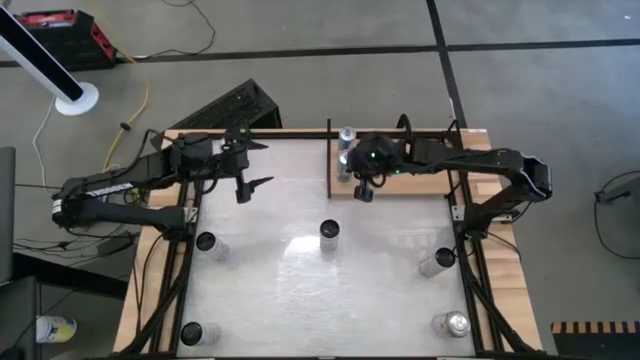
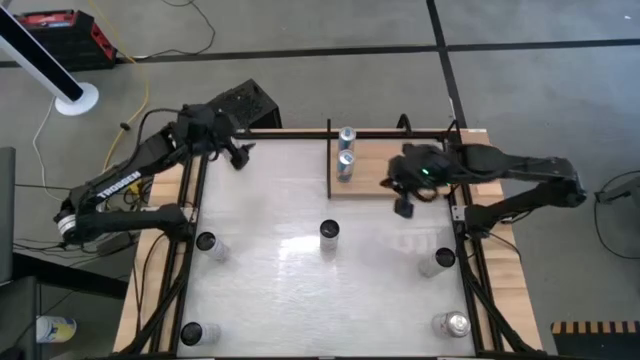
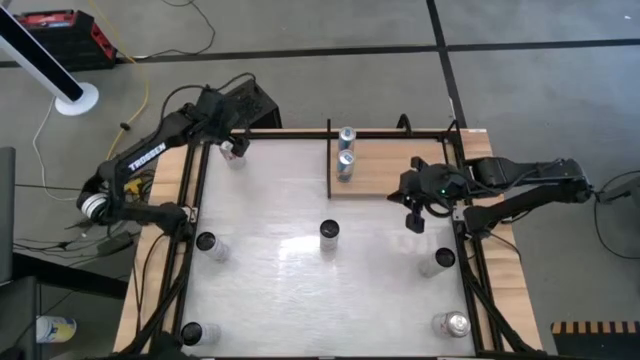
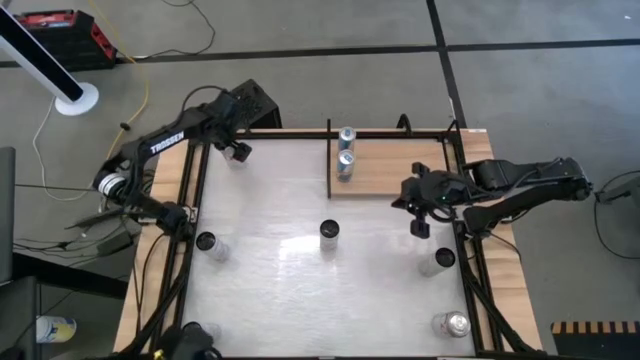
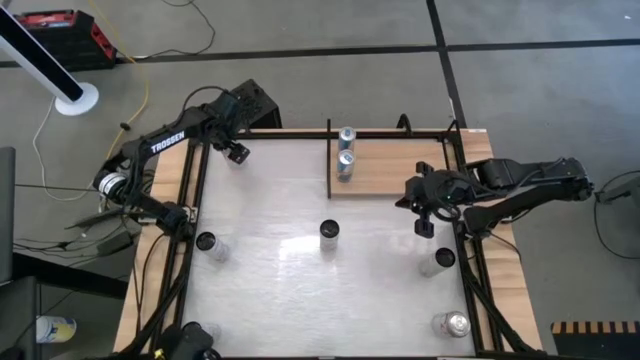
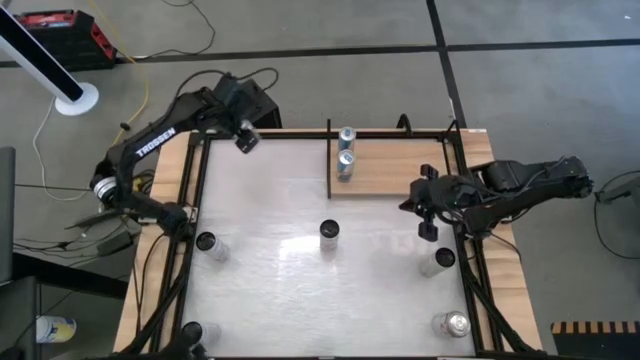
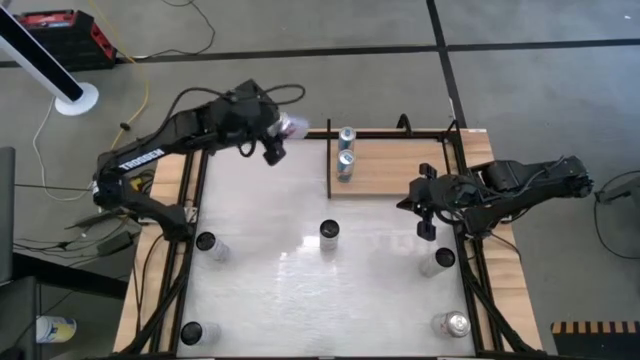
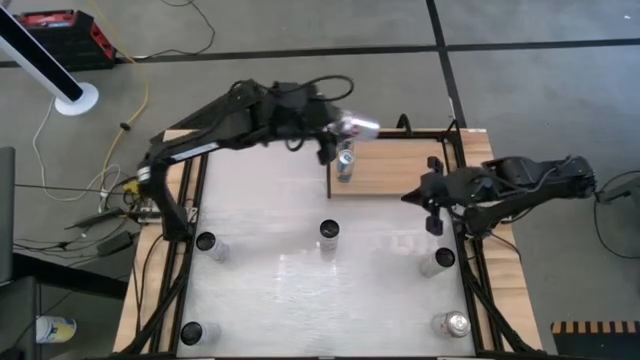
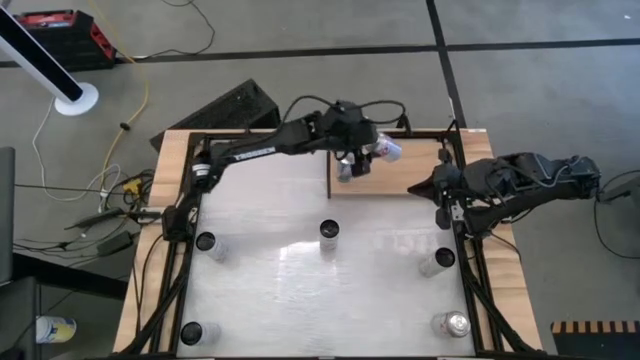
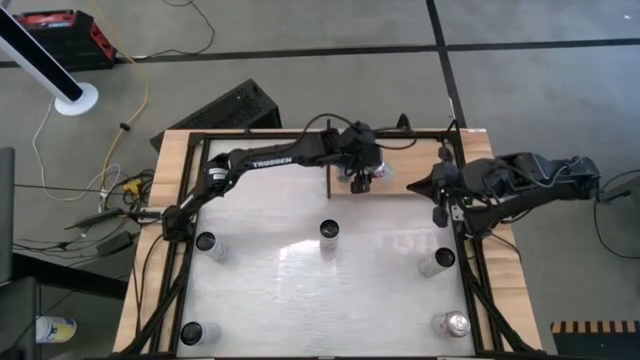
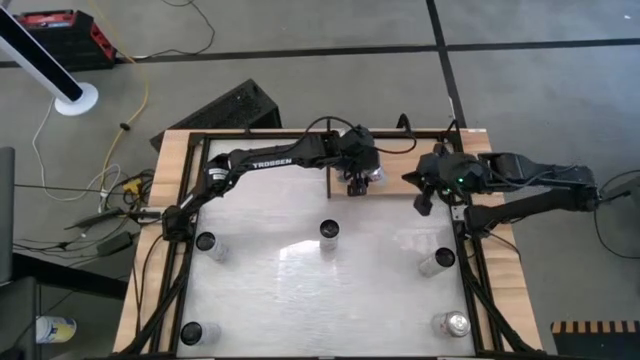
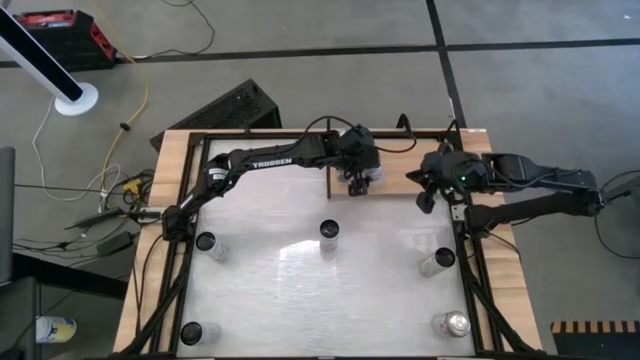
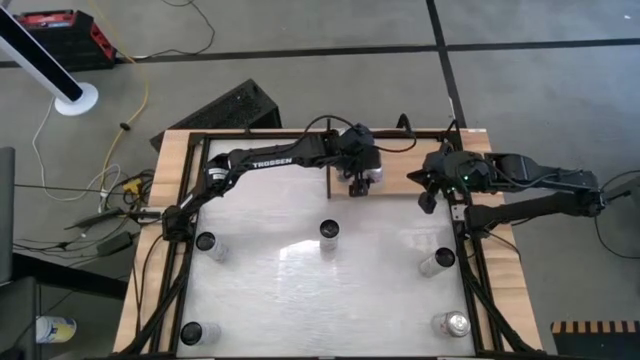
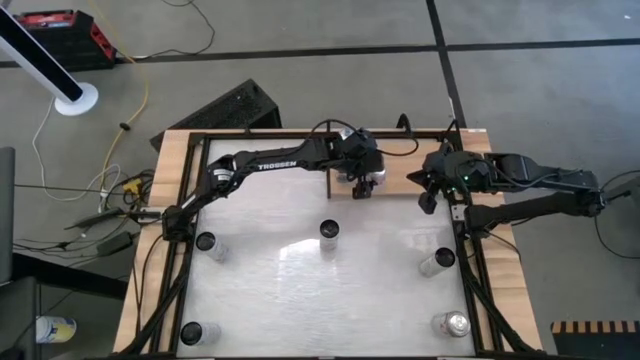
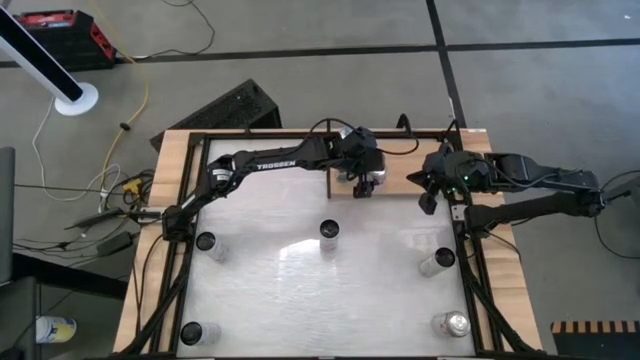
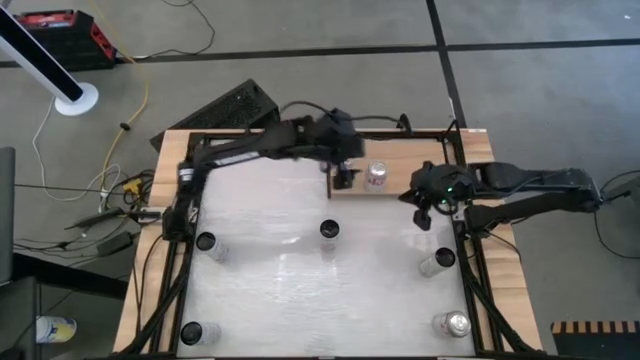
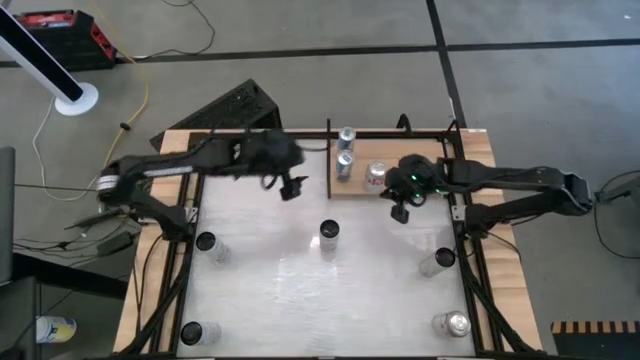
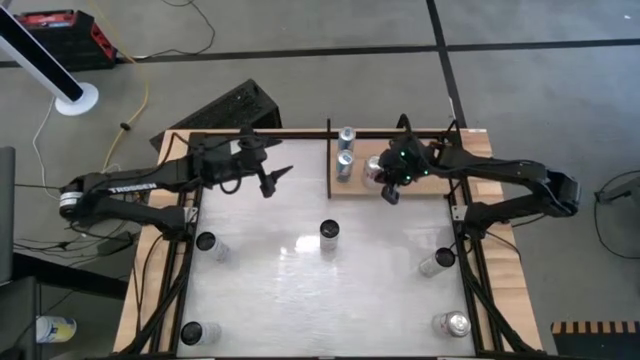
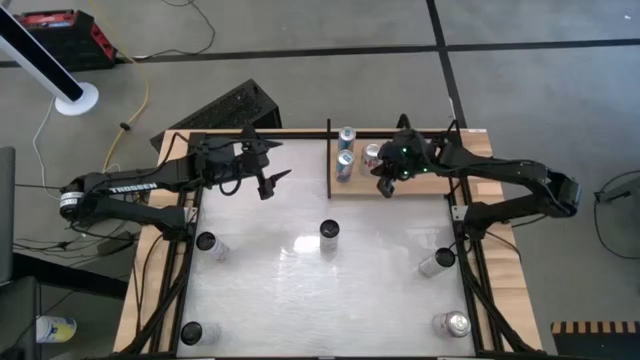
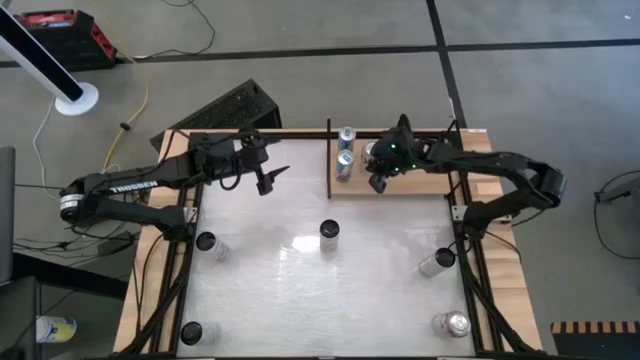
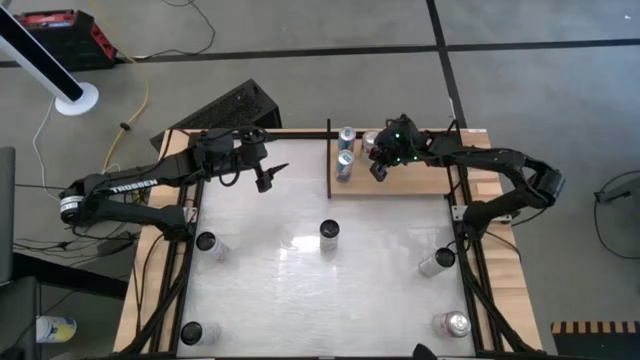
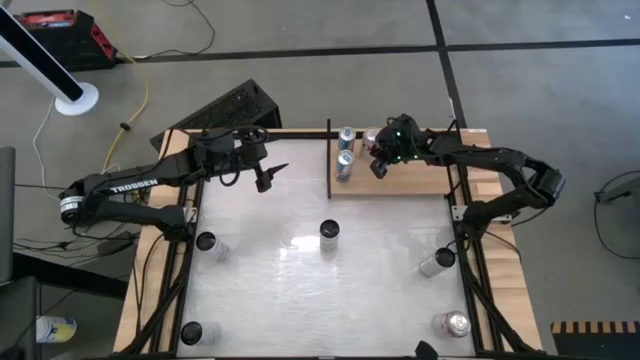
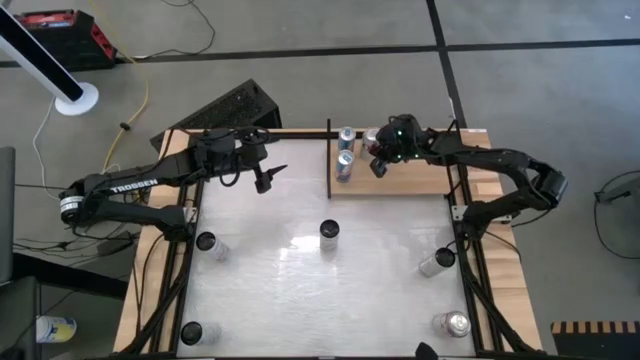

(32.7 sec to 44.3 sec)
Task: Place canned beverage on shelf
Put the top red-silver soda can

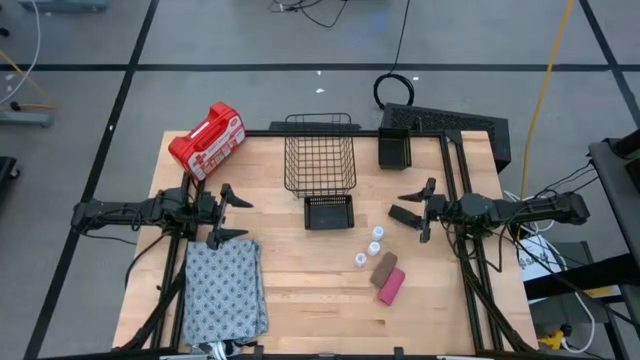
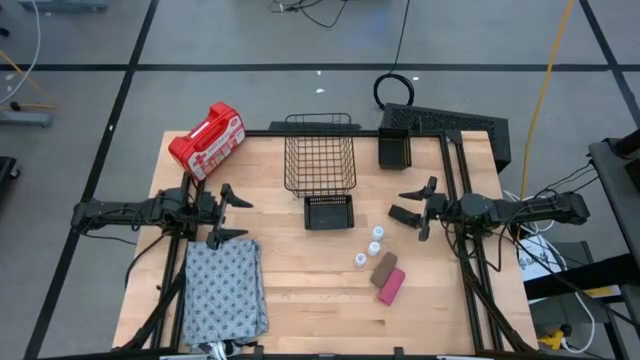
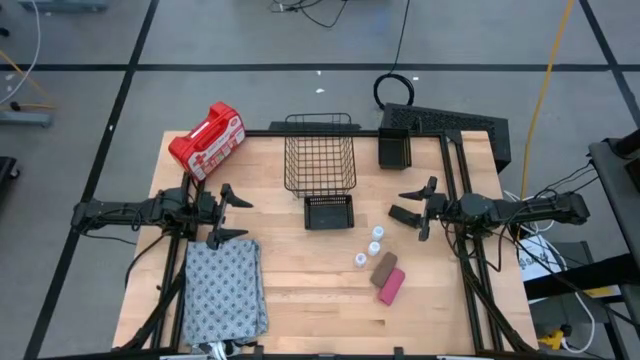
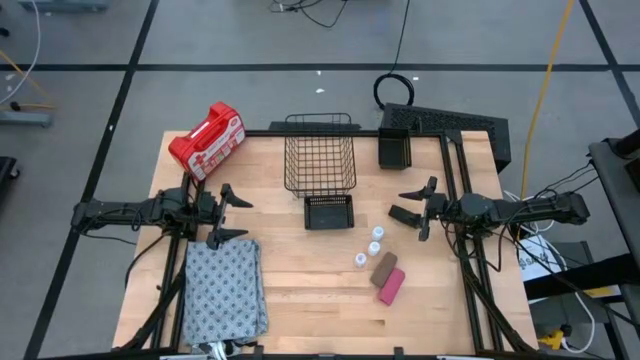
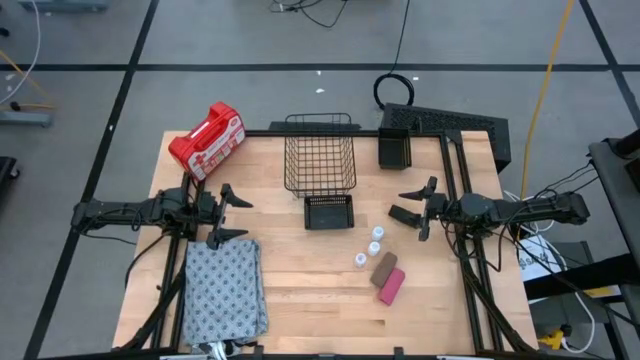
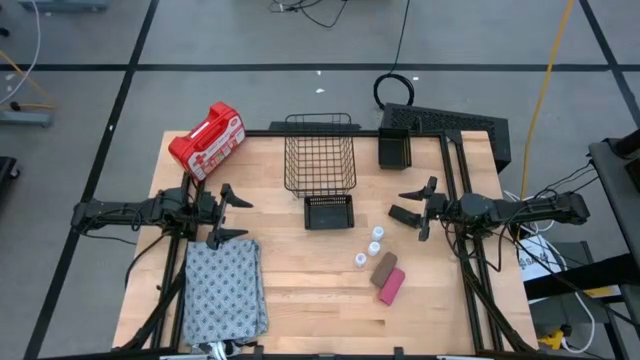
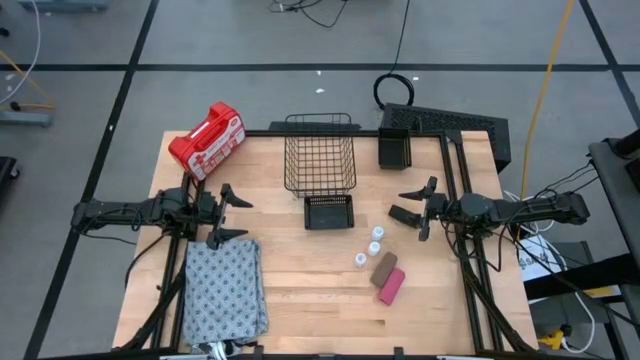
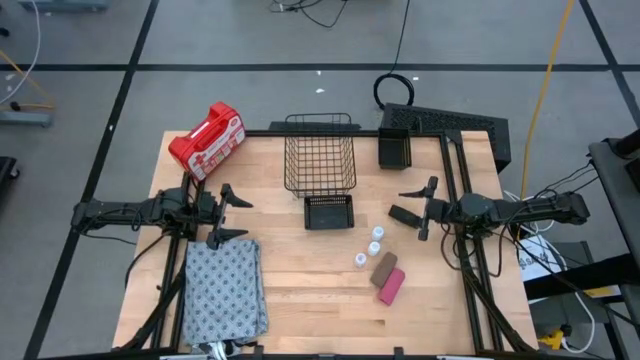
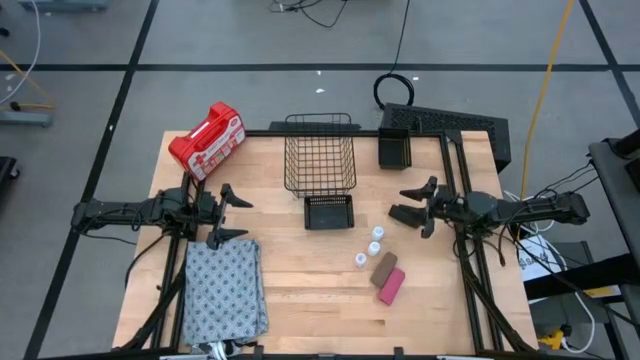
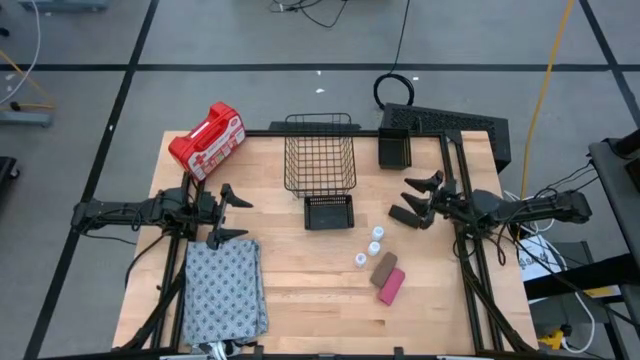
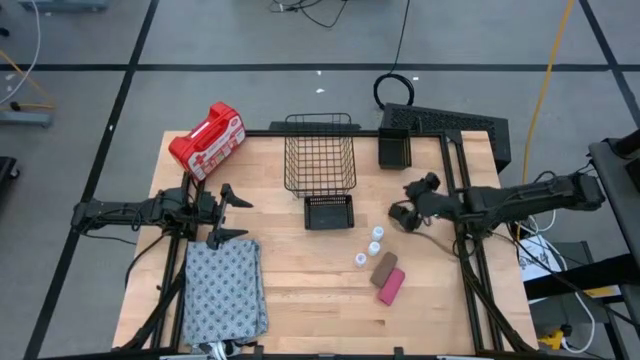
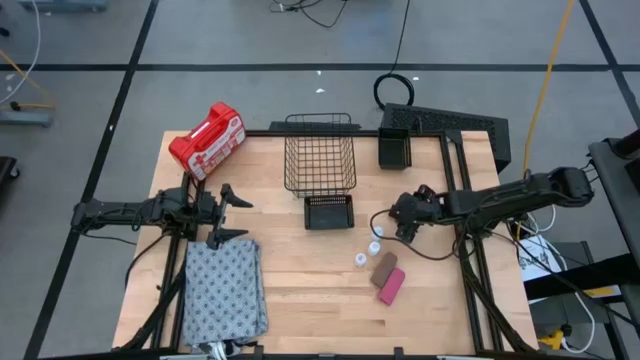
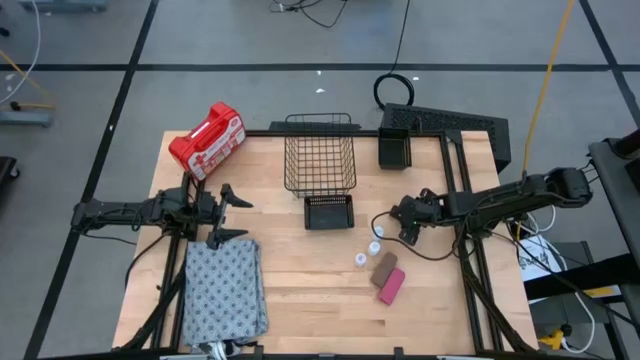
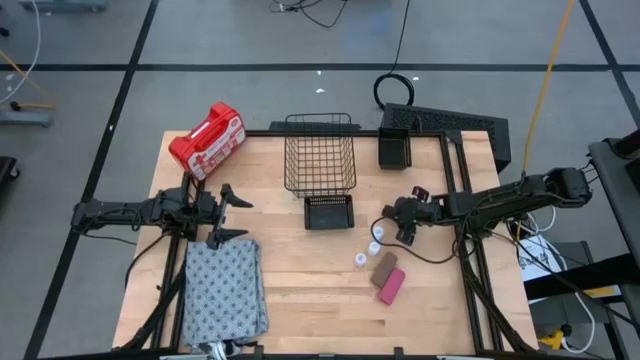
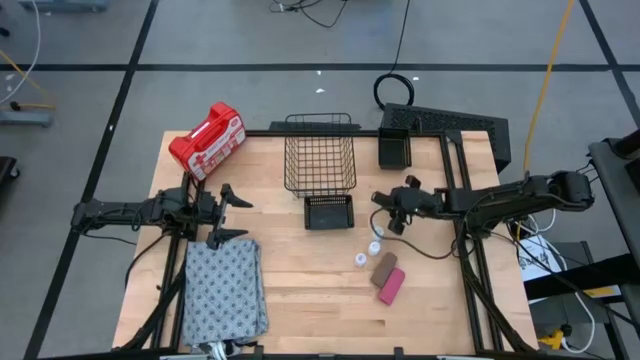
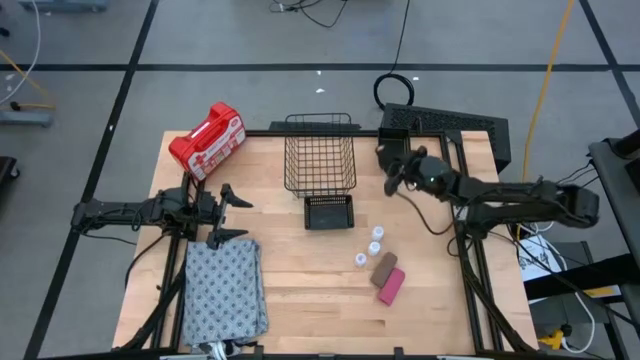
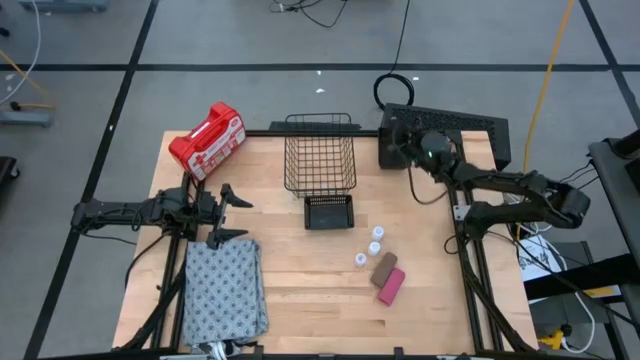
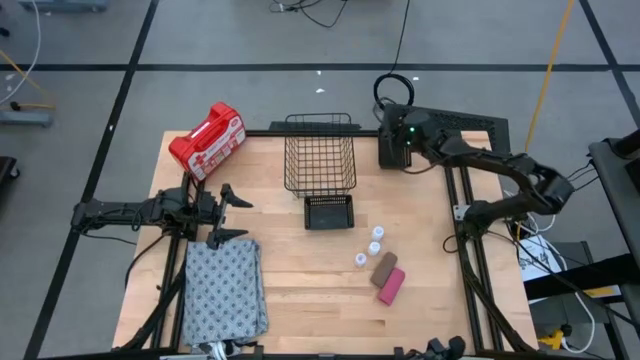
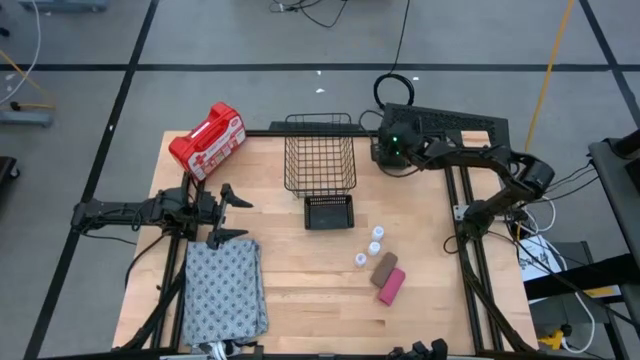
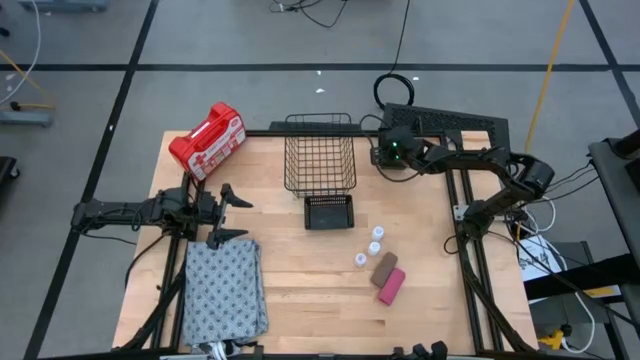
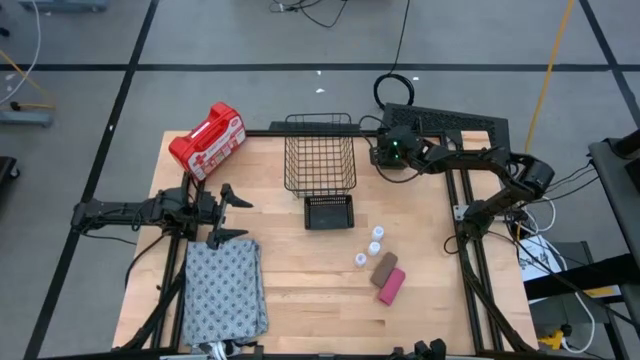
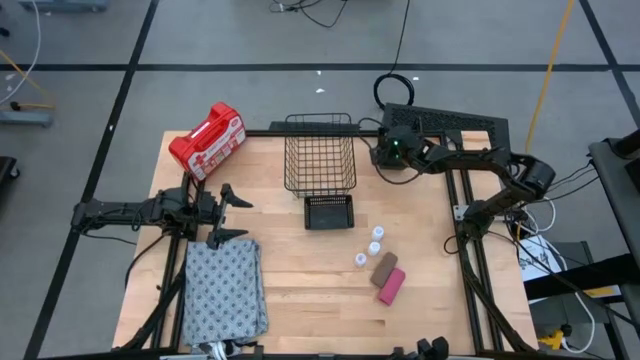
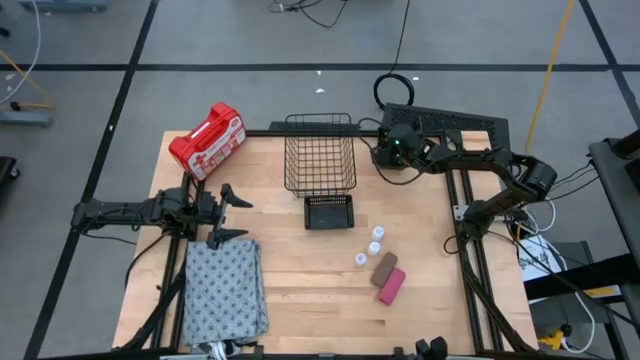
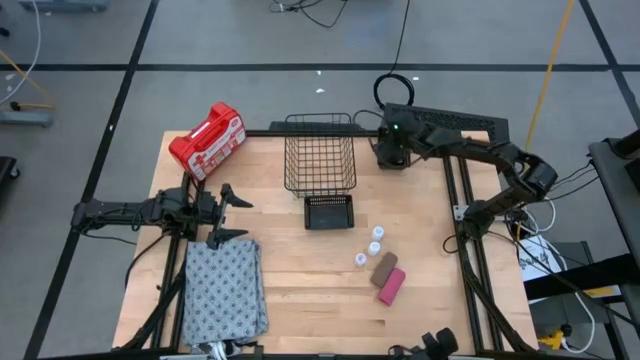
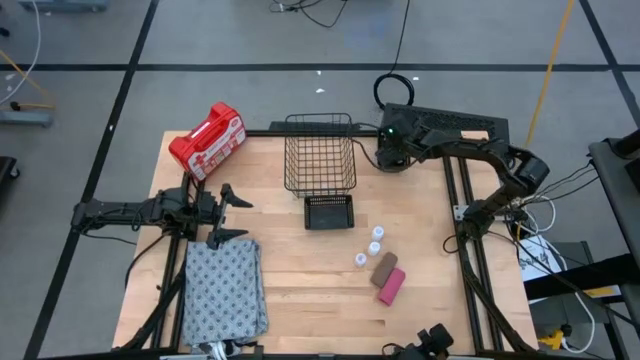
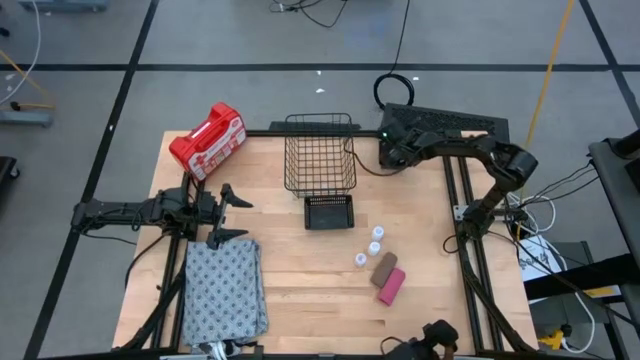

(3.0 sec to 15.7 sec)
Task: Pick & place medical supplies in basket/bin
Put the rolled black bandage into the top black bin
